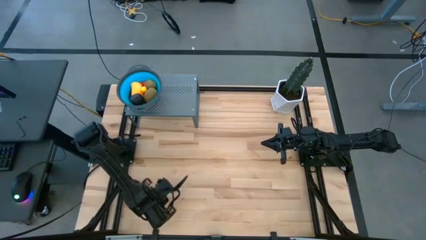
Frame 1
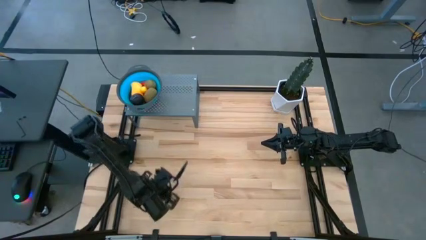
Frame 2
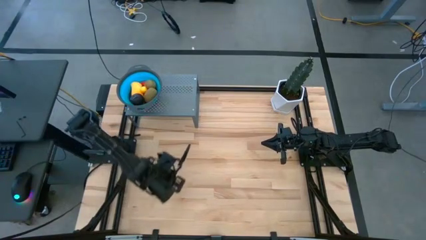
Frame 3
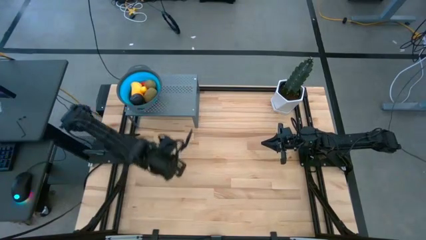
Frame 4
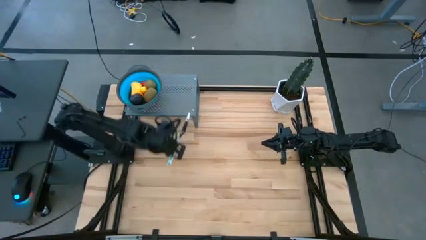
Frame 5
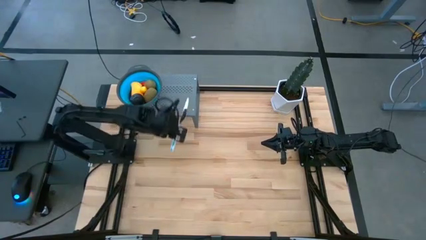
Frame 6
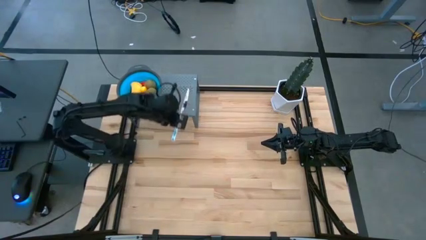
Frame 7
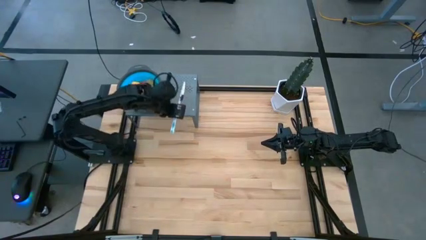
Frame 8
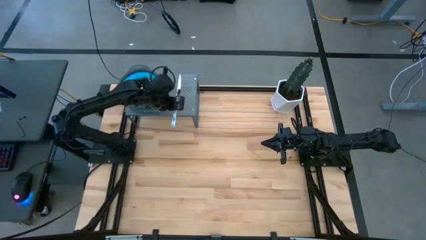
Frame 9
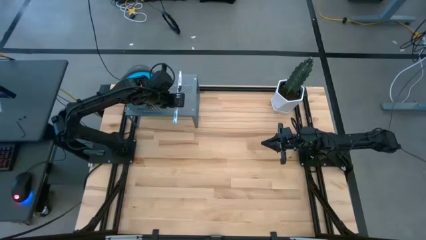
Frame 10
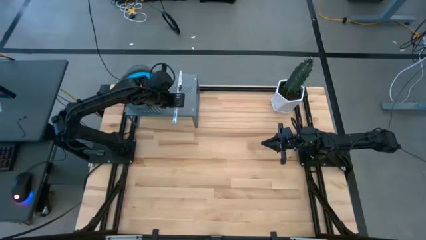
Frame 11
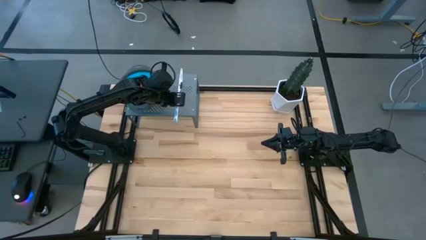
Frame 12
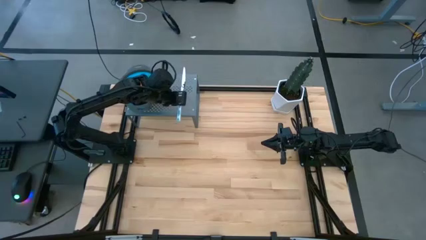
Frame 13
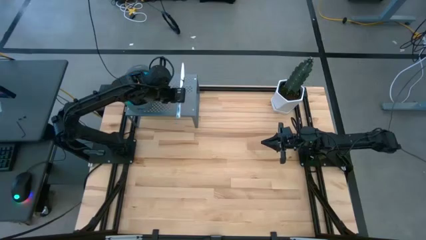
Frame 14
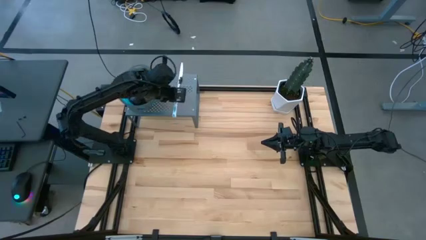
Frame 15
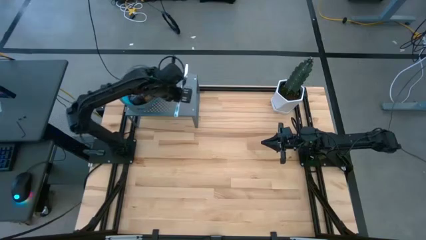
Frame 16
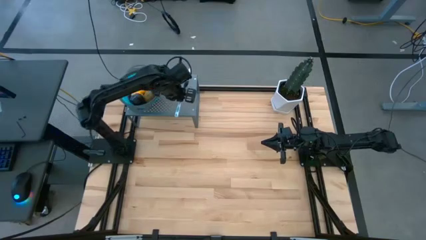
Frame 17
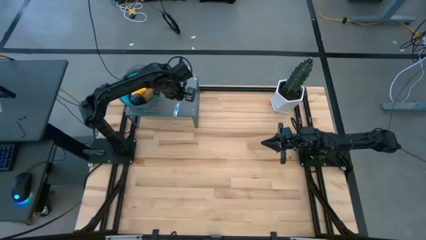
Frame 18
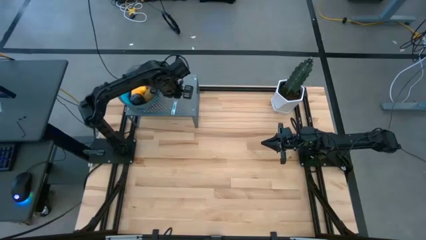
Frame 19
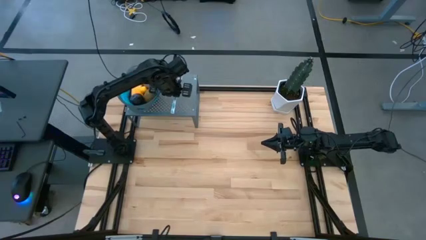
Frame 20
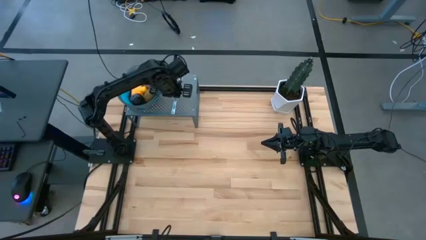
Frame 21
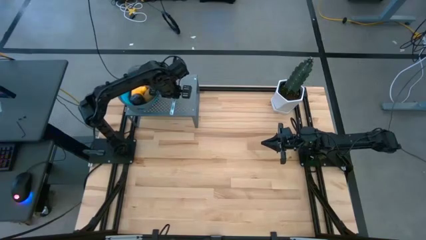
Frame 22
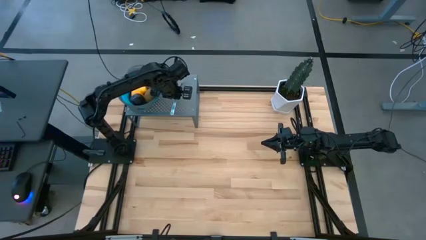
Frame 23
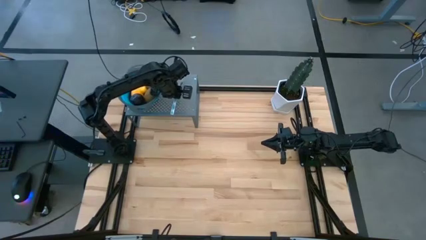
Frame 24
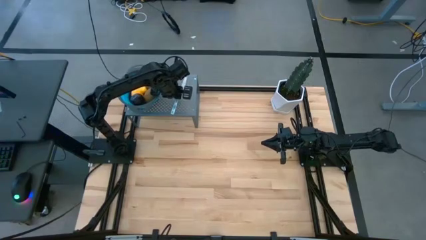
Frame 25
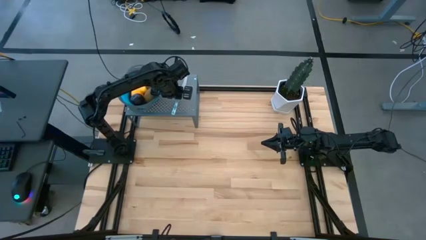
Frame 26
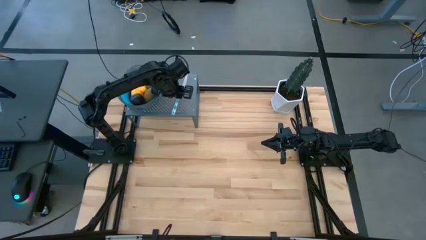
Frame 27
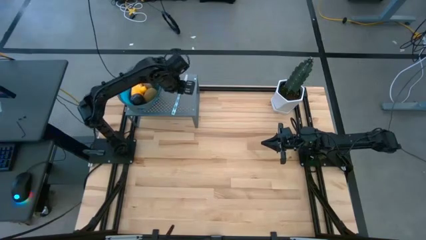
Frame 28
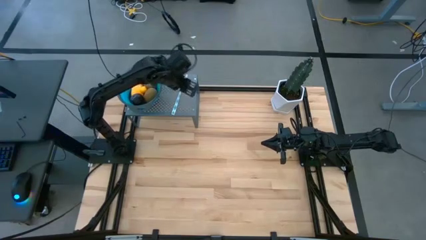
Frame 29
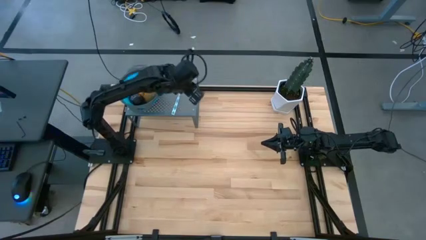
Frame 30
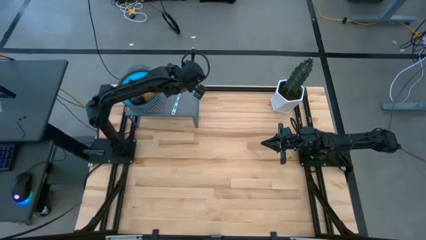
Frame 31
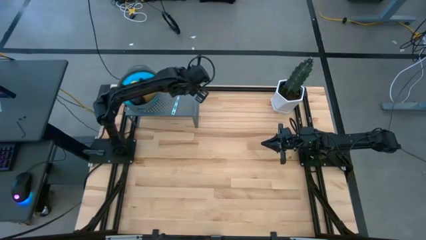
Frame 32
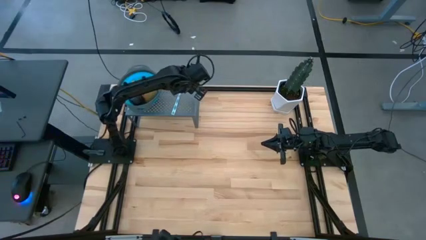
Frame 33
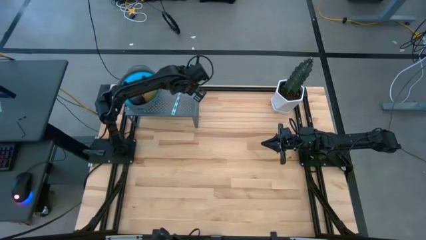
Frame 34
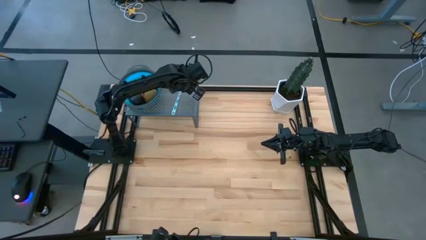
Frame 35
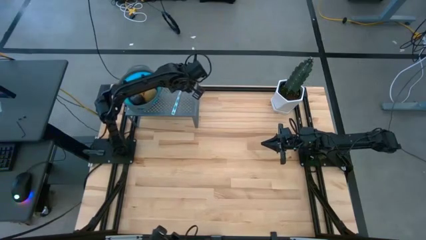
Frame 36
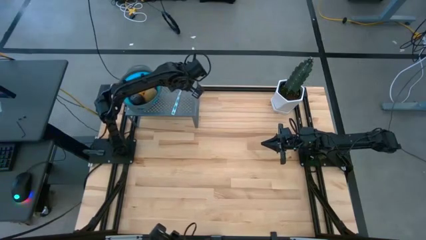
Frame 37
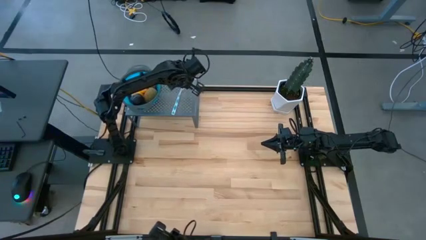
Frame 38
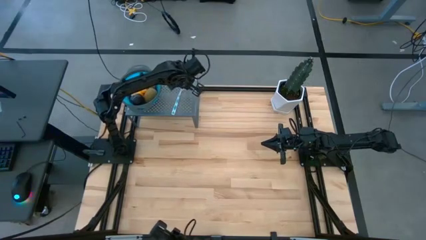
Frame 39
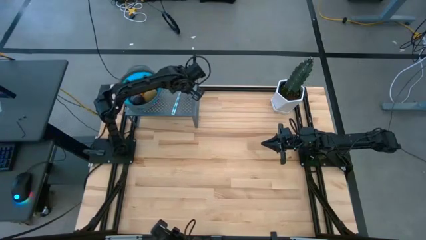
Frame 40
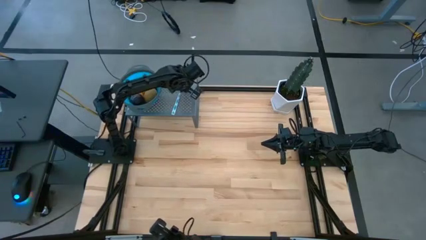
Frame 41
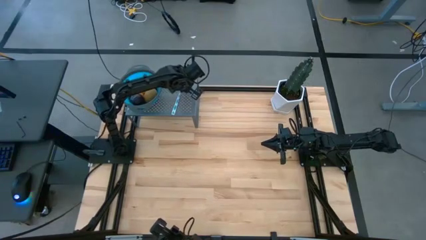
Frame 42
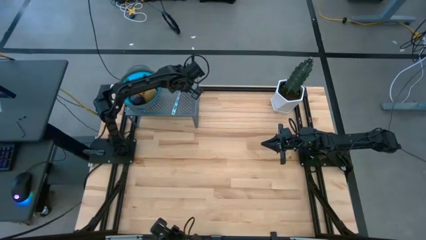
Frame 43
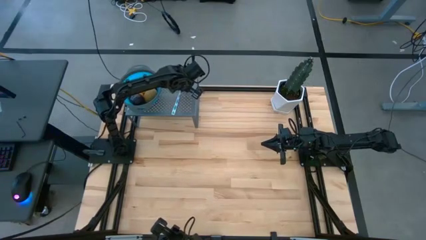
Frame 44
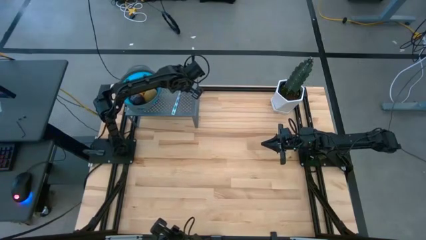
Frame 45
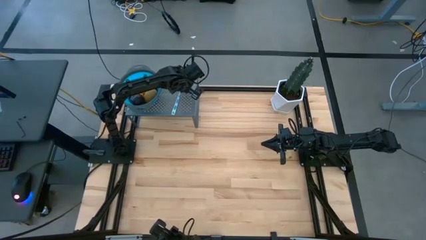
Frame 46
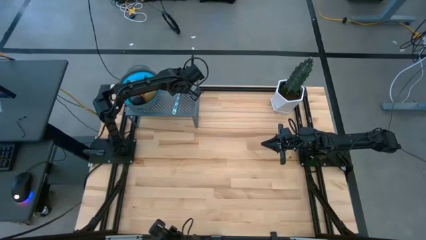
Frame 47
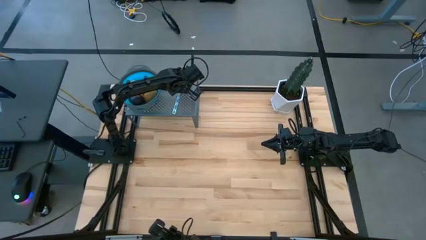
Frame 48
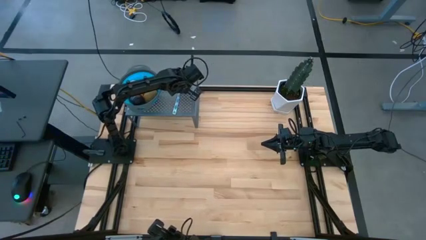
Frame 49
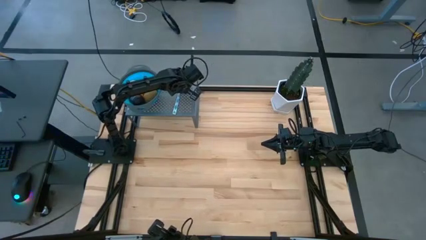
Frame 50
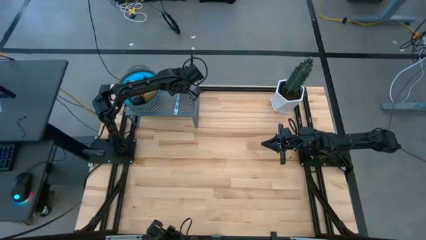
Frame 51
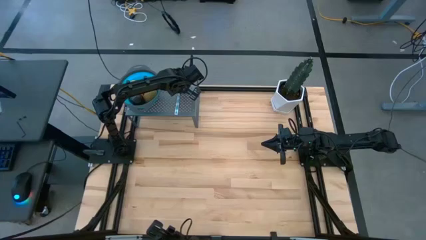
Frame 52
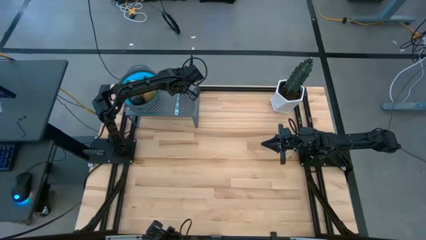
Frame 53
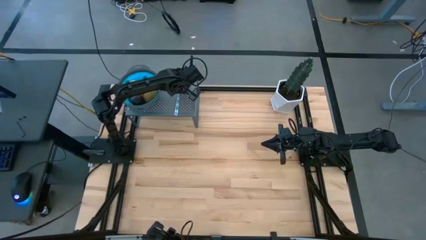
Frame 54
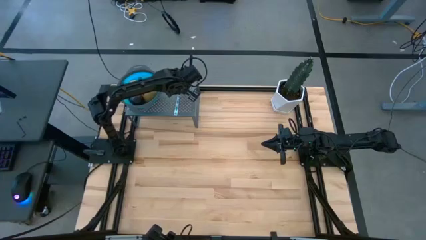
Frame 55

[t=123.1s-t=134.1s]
Task: Pick & Place Fruit
Put the blue knife on the shelf

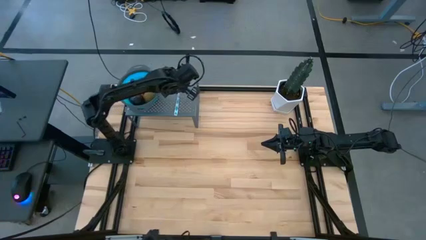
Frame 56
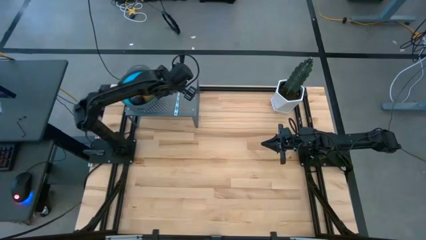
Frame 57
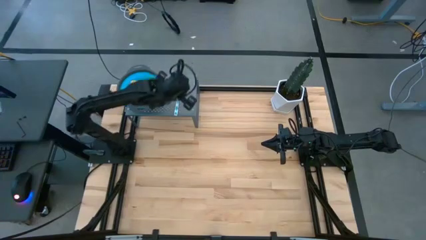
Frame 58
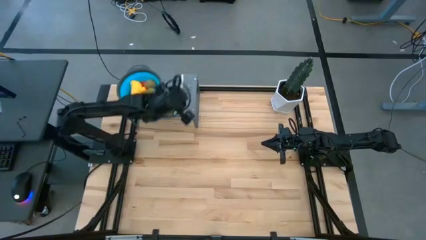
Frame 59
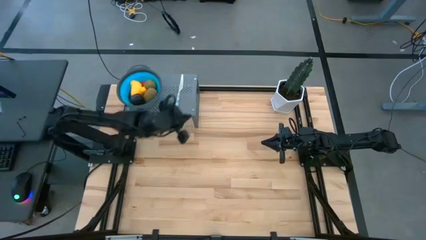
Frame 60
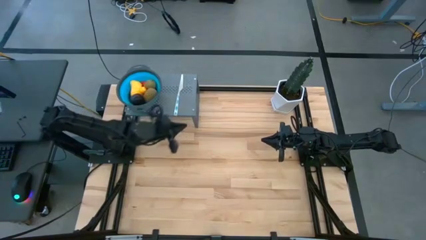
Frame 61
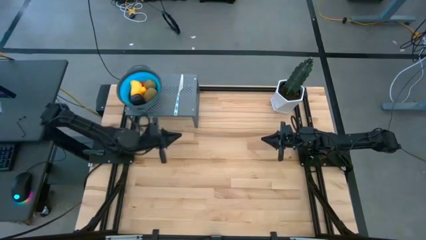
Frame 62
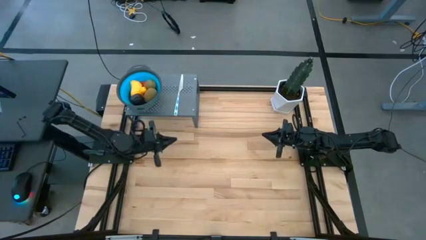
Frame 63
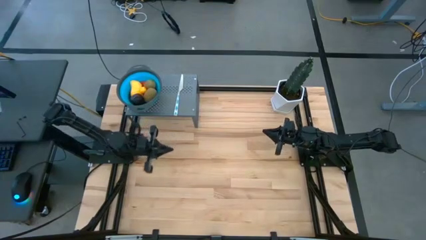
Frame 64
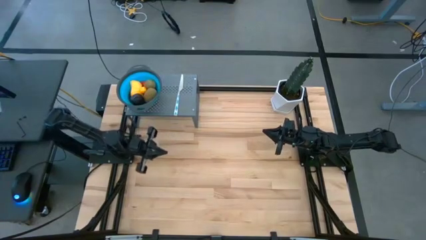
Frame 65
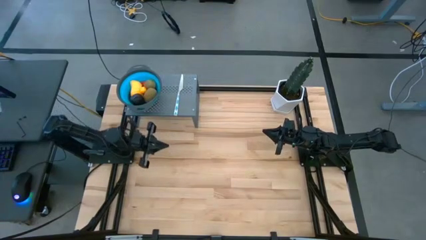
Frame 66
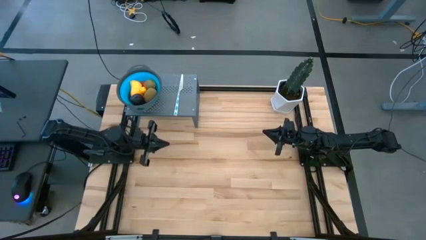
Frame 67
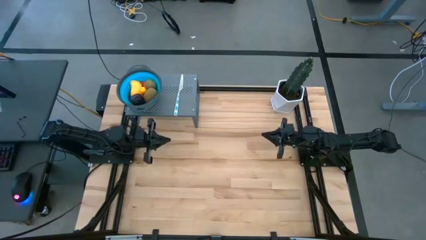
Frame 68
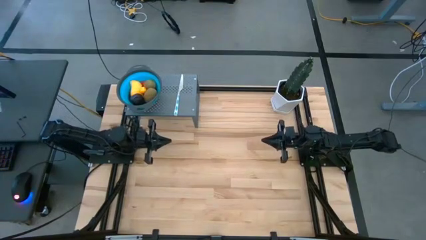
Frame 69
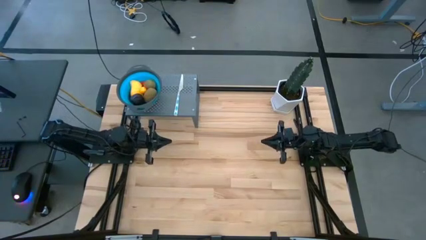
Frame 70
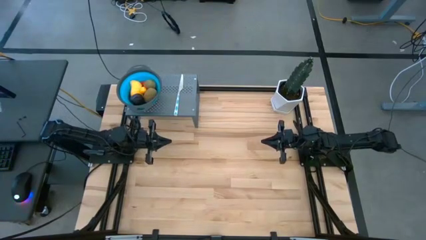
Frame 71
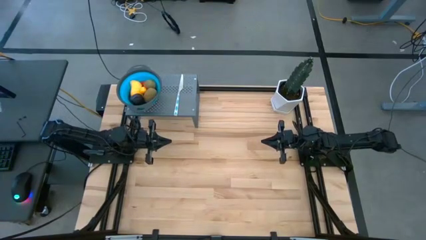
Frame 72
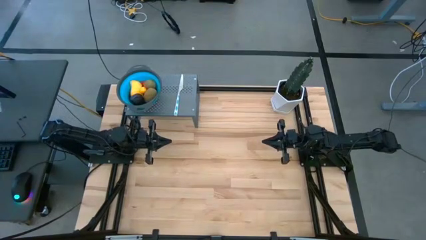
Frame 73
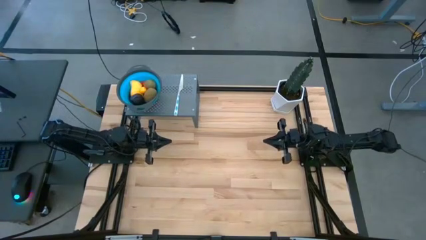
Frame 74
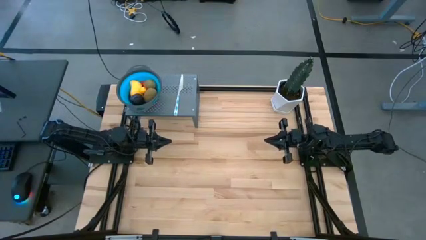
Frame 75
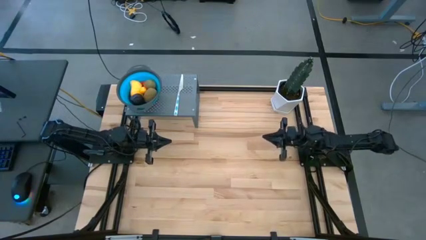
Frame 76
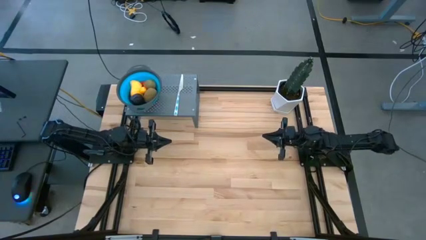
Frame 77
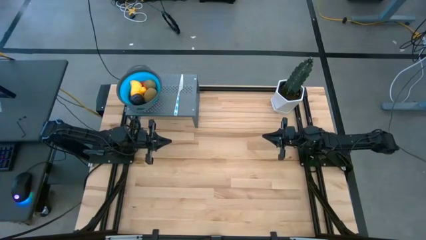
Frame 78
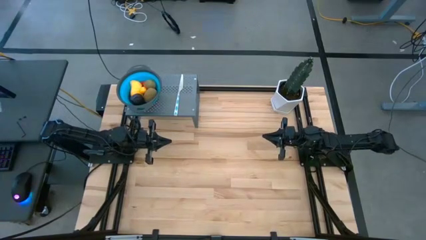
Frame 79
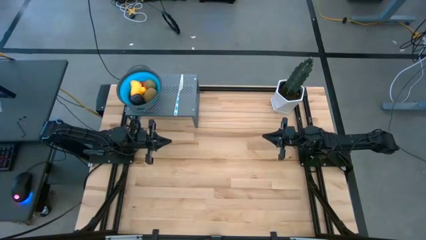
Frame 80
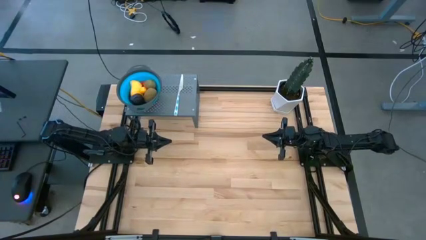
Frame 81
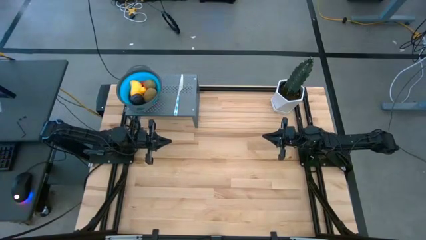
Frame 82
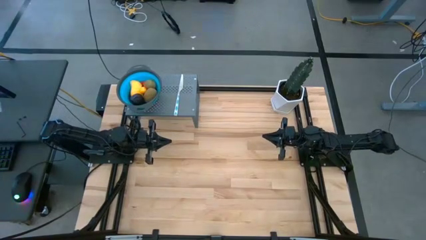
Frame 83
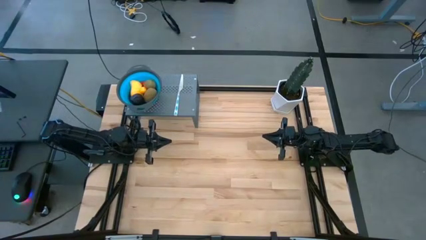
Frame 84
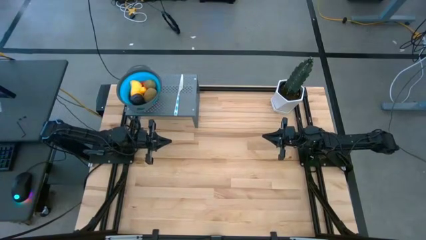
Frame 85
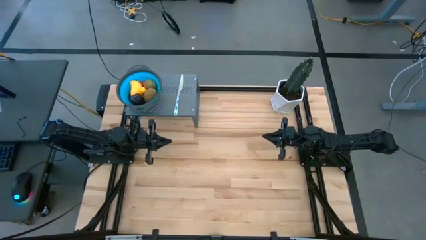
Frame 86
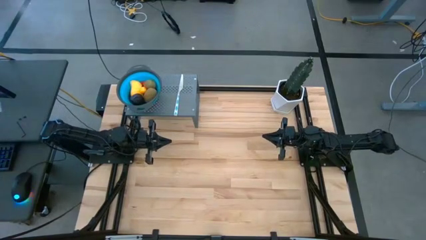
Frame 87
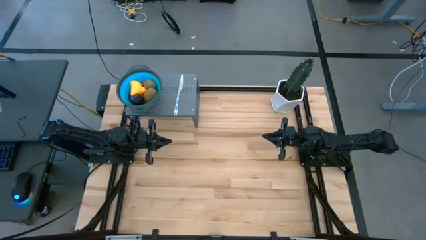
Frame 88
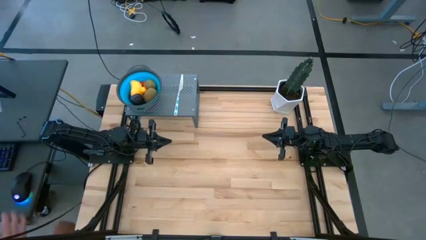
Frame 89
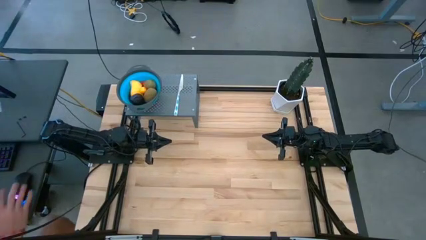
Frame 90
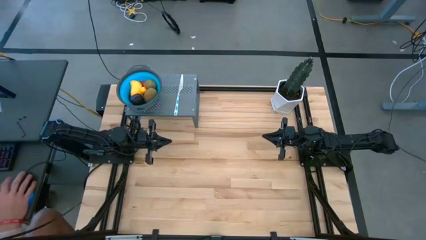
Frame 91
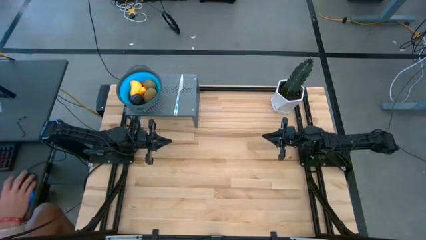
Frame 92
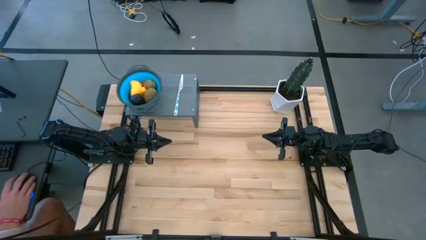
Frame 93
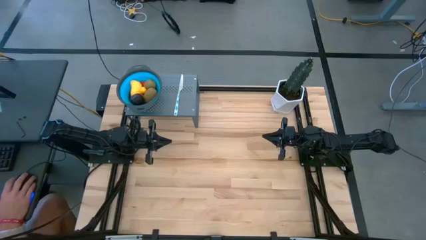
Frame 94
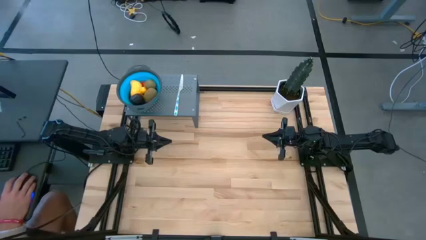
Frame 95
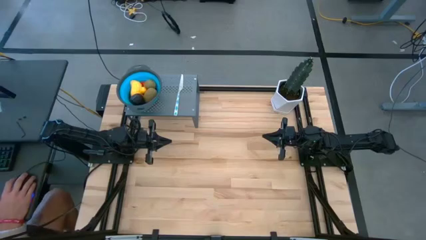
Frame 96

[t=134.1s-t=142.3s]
Return to Home Position
